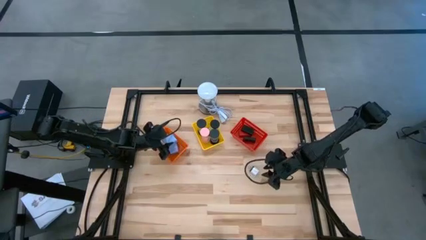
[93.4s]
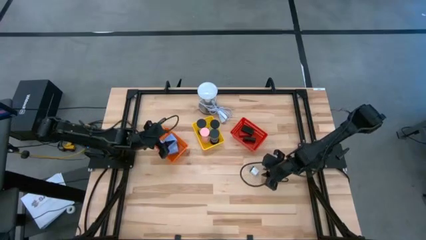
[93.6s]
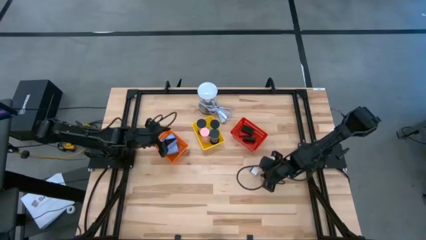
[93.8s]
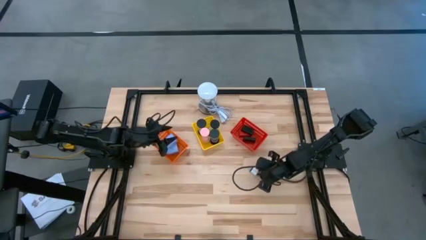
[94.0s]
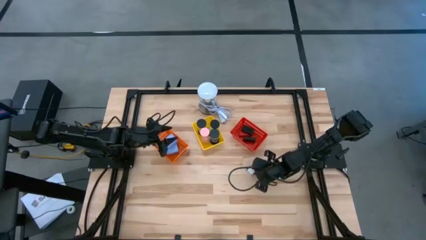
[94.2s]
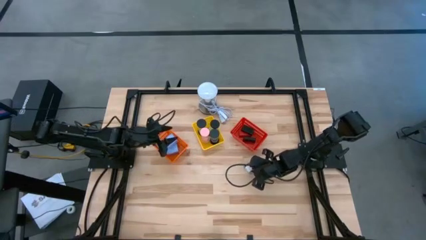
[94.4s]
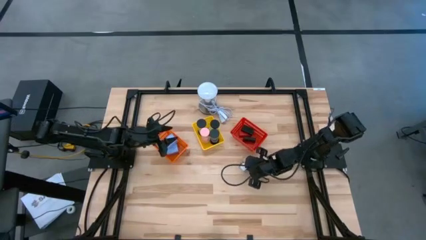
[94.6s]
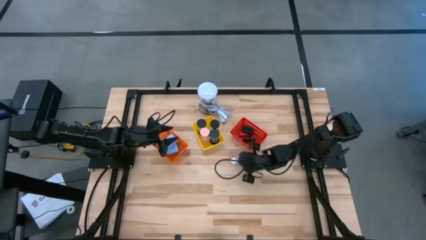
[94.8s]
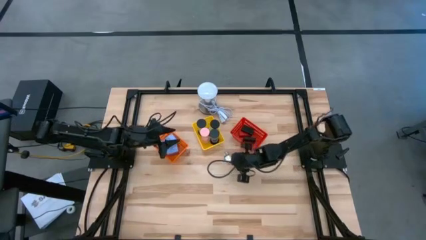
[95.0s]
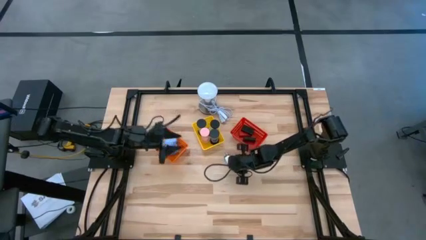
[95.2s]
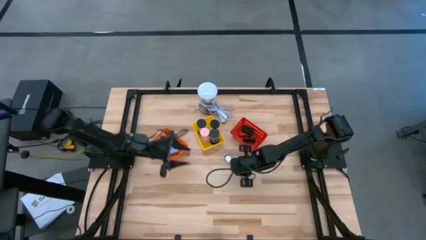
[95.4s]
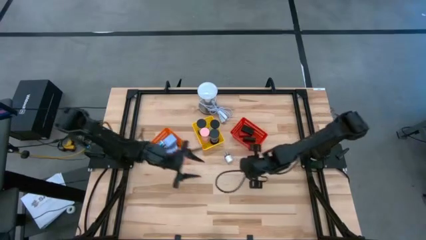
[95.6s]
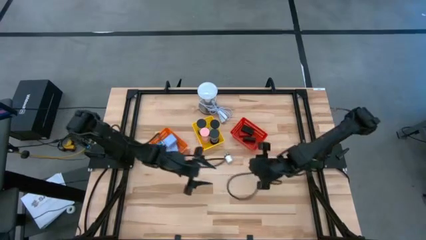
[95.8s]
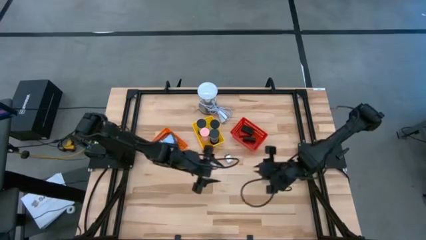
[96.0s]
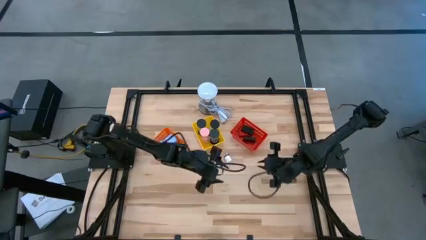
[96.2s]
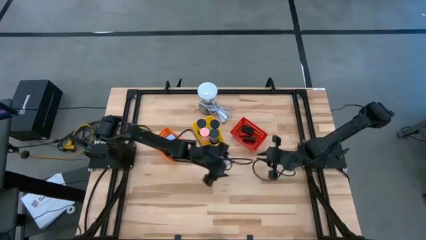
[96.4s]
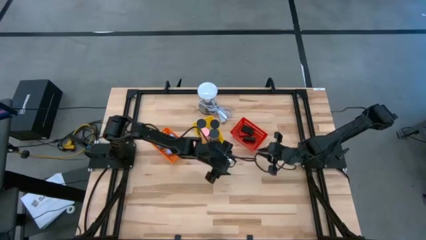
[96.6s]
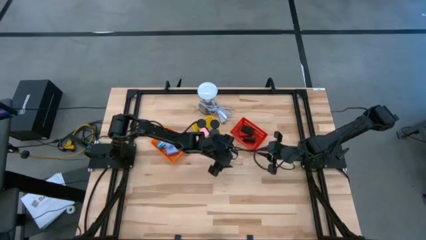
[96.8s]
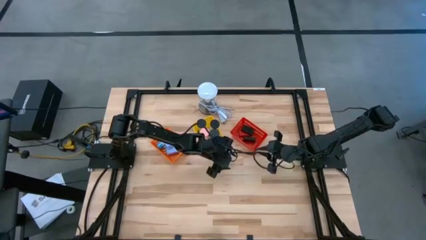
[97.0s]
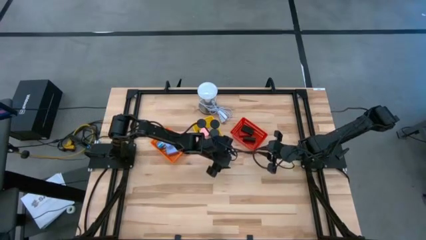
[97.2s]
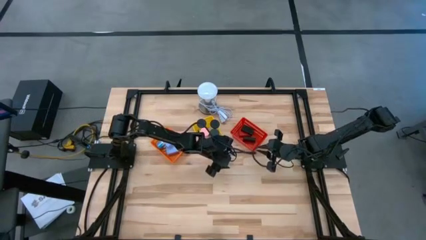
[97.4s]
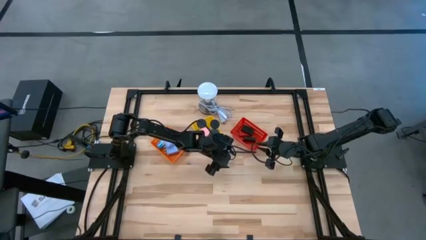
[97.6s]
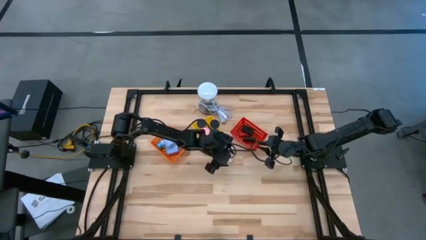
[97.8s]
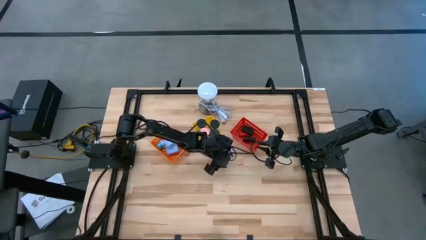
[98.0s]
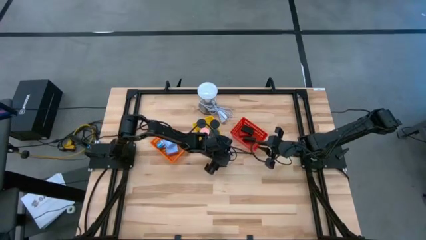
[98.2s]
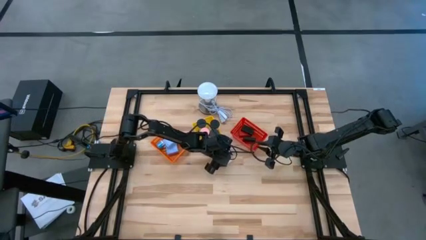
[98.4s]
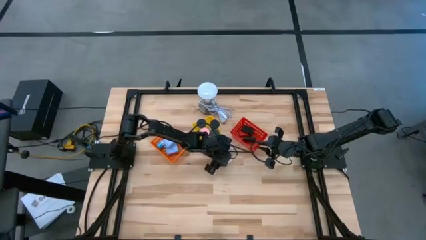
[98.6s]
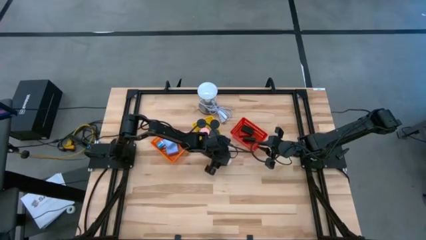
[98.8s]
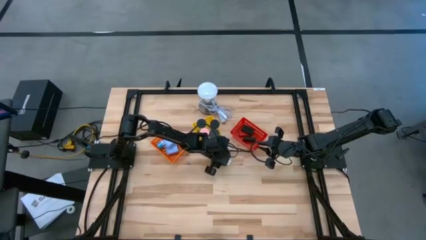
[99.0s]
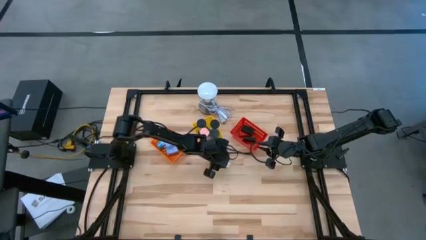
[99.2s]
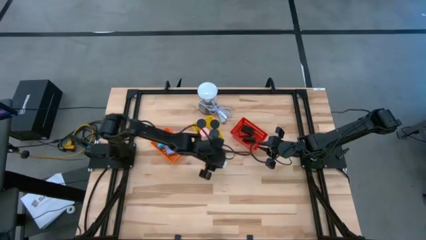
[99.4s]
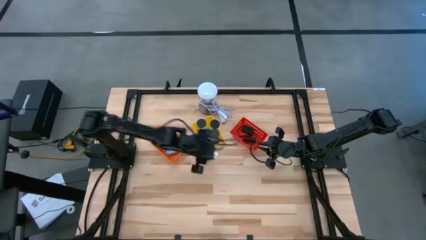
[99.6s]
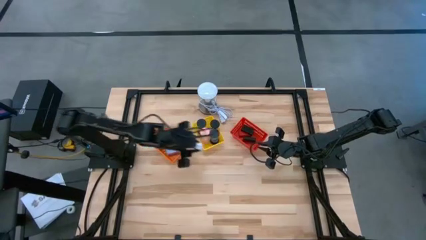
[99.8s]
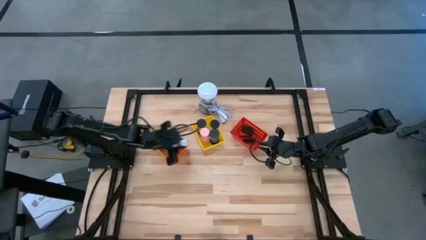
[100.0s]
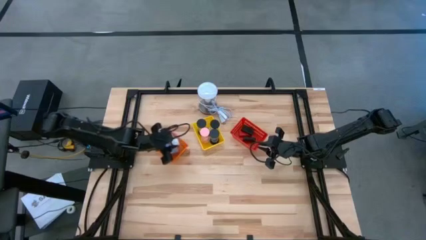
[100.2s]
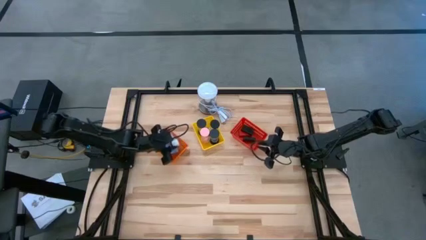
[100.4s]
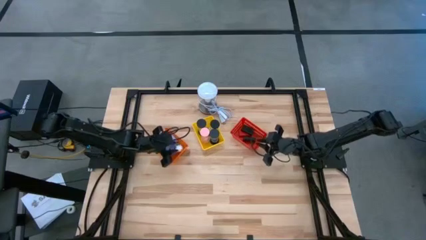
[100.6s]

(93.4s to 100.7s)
Task: Pick & Place Office items
Put the small white charger adapter into the orange basket

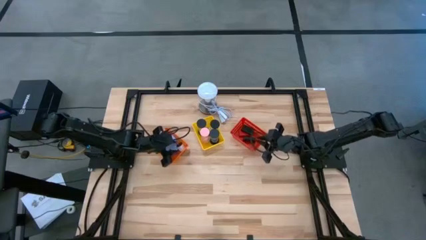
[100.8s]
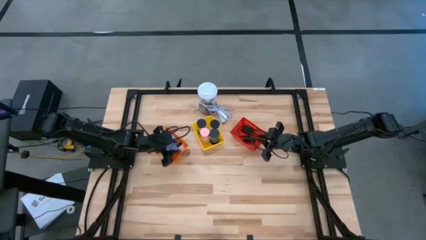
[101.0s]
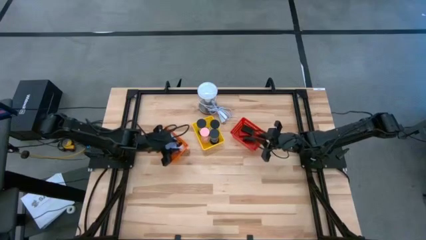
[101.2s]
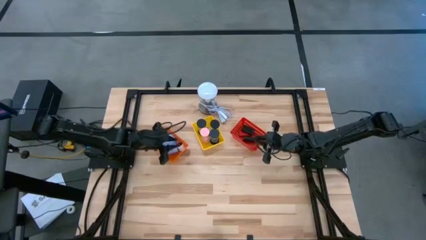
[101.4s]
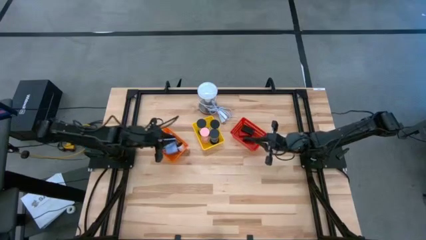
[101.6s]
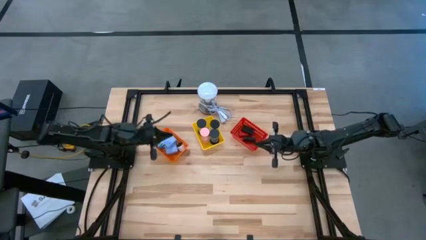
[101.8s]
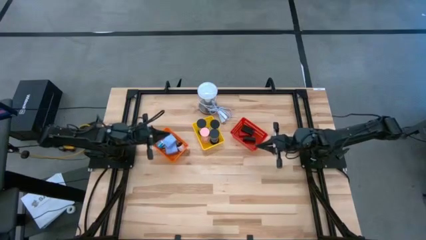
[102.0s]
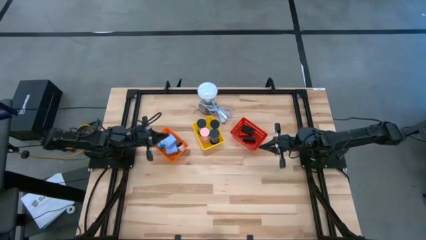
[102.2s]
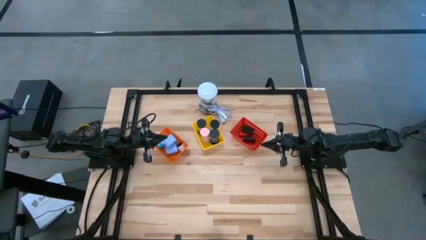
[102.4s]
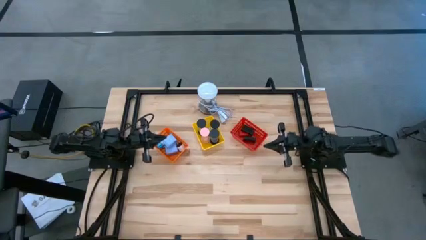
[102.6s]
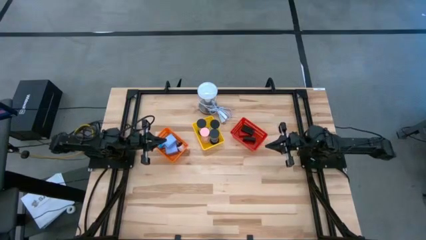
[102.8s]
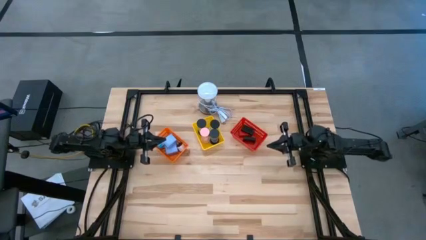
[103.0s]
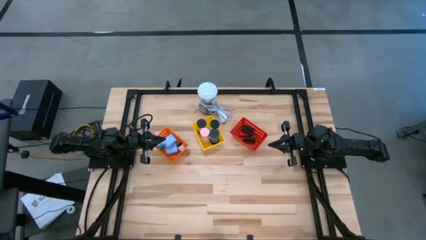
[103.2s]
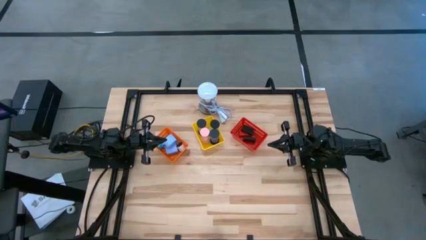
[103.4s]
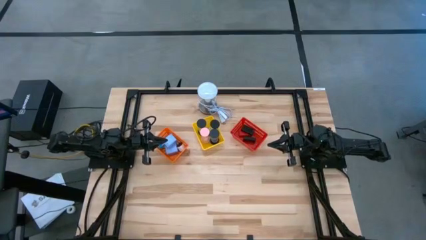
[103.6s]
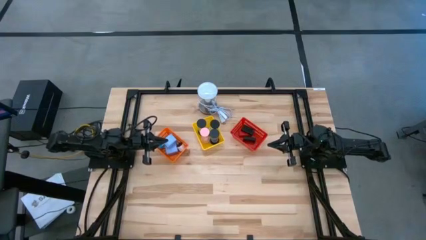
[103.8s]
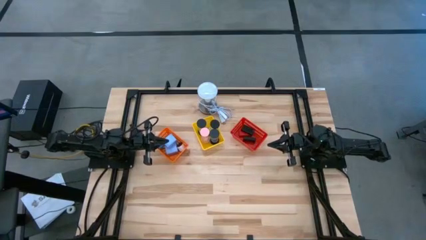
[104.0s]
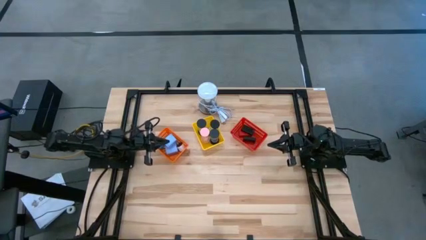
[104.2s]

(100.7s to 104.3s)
Return to Home Position

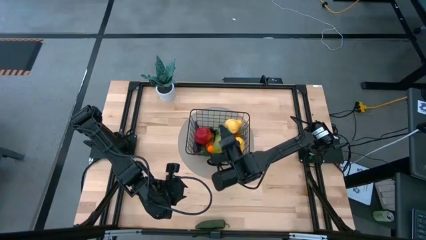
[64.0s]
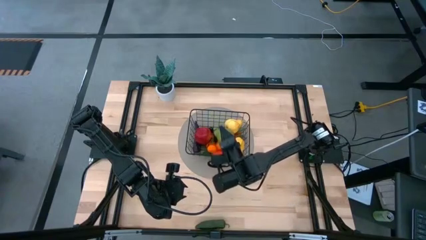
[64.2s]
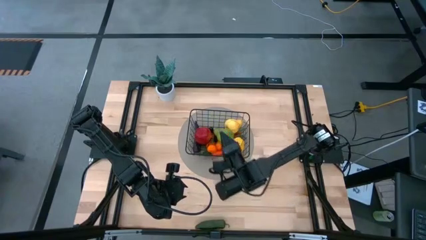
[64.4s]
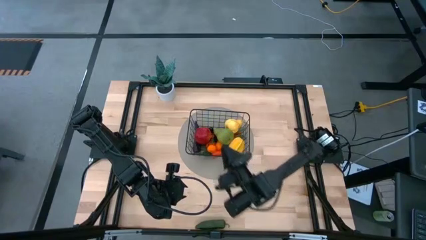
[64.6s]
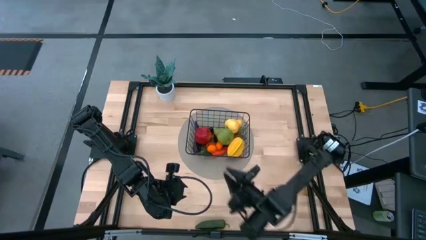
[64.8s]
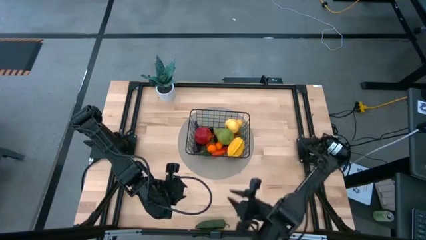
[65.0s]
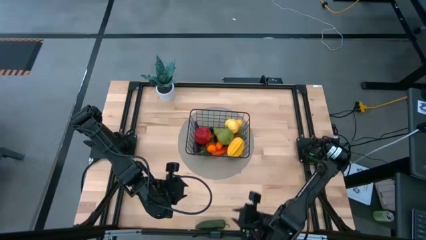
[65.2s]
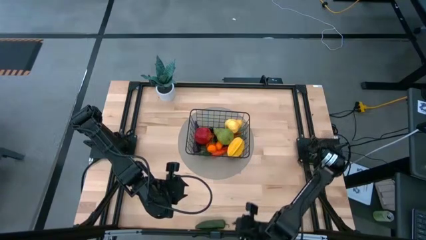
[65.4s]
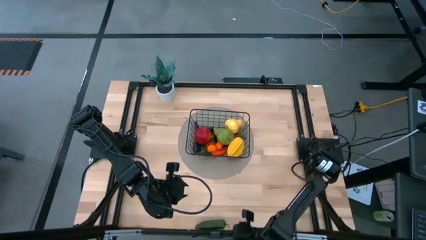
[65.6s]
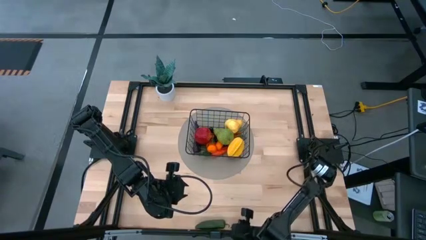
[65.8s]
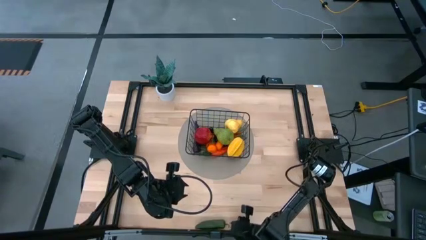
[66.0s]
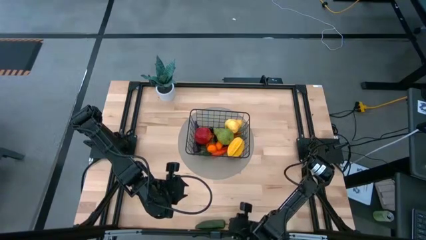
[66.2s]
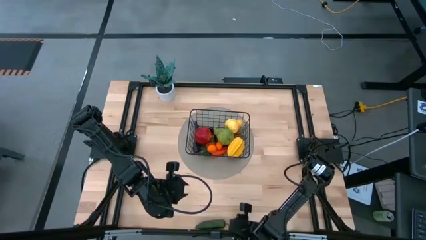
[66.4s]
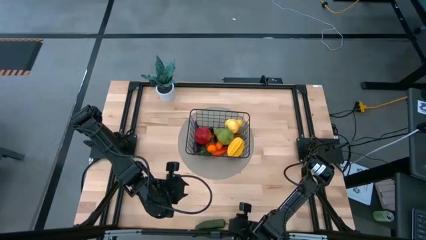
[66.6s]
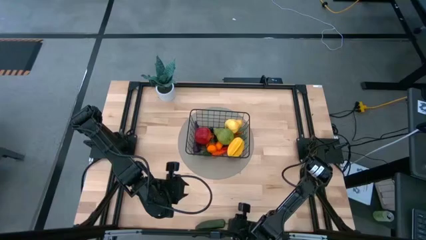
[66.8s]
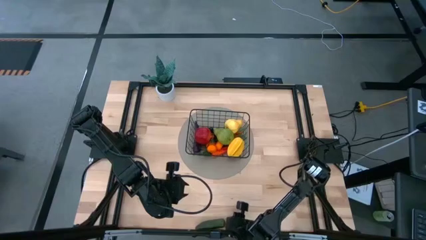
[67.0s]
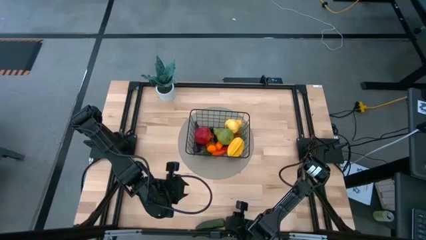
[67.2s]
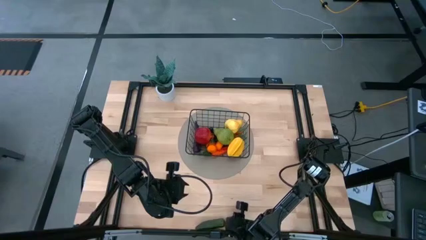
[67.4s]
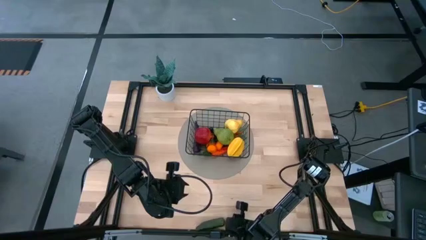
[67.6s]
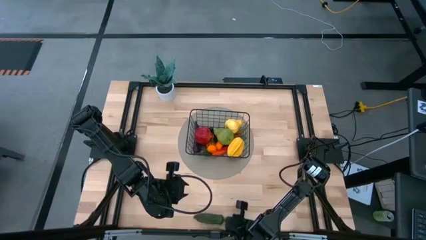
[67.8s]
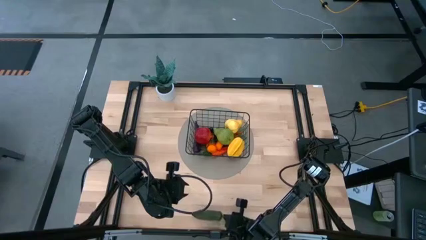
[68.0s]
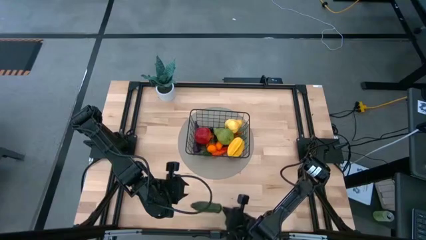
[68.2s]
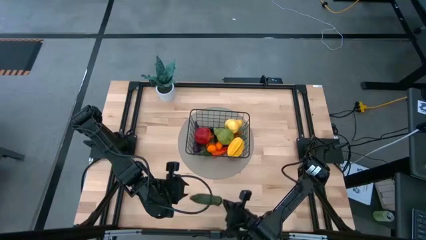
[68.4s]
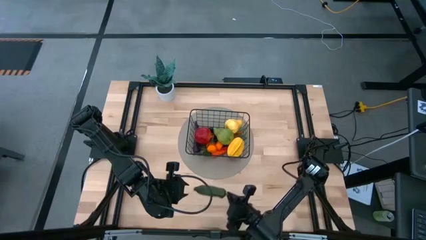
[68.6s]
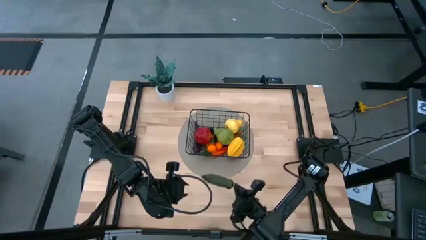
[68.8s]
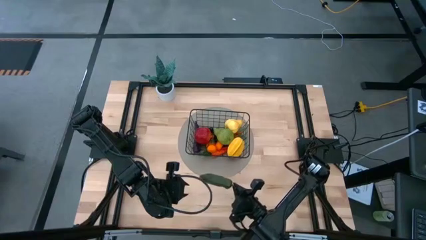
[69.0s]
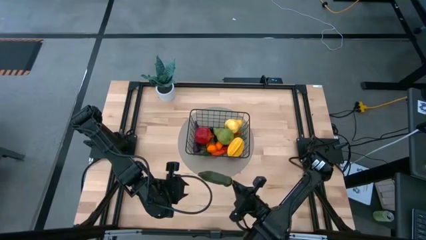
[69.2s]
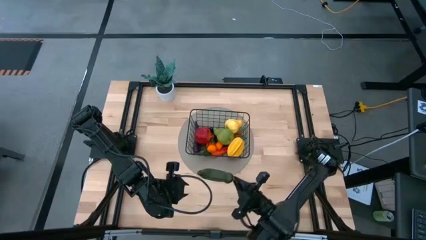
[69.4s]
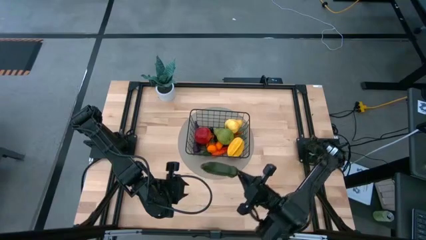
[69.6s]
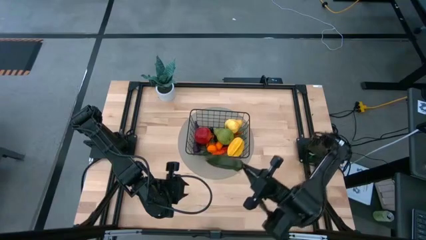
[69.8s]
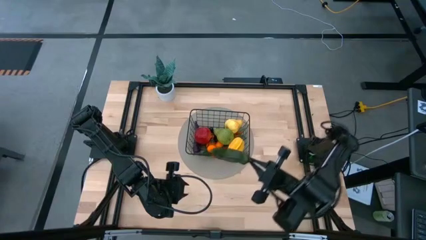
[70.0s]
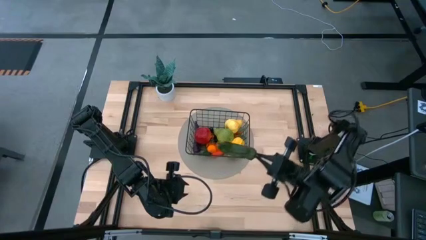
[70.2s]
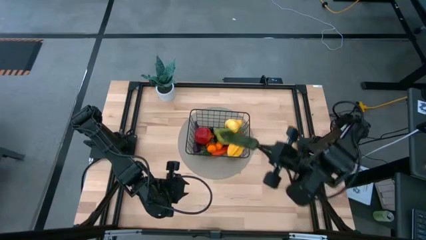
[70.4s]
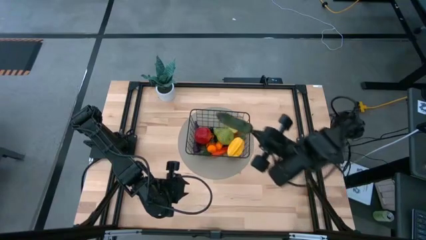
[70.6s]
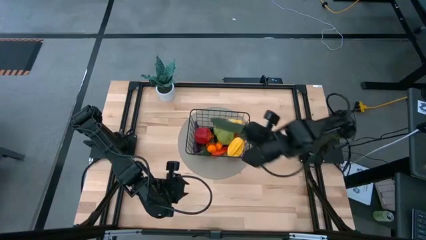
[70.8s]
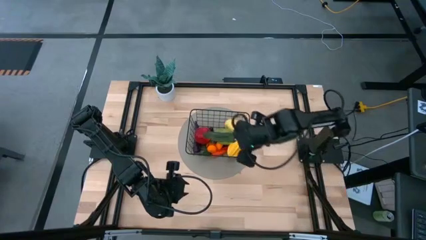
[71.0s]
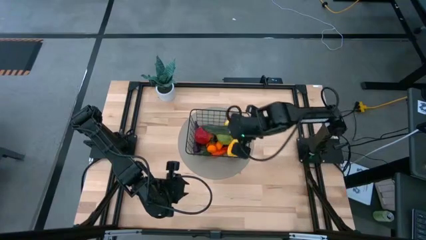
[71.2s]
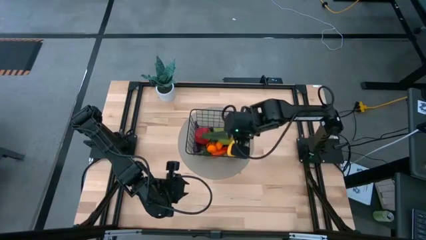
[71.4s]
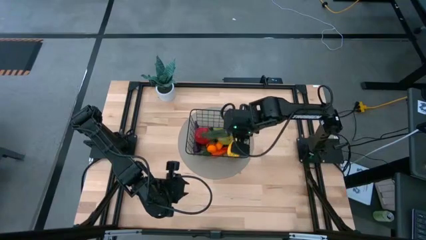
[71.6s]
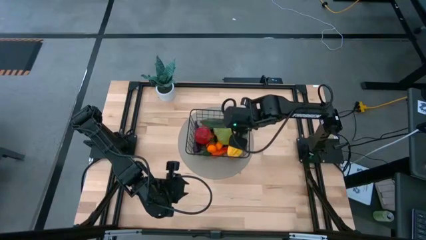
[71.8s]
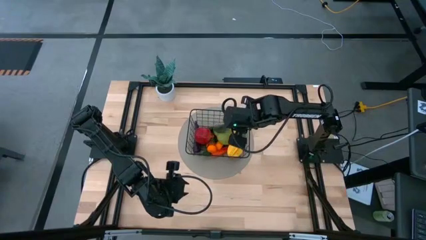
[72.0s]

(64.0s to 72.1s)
Task: Build produce basket
Put the dark green chili pepper into the black wire basket
